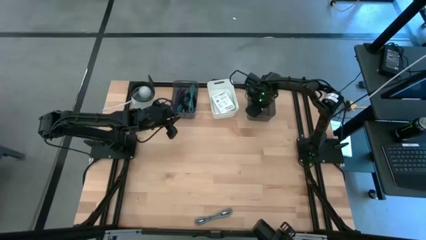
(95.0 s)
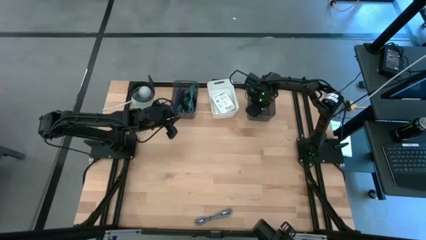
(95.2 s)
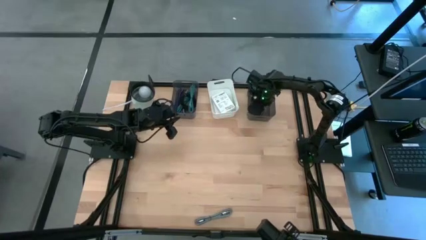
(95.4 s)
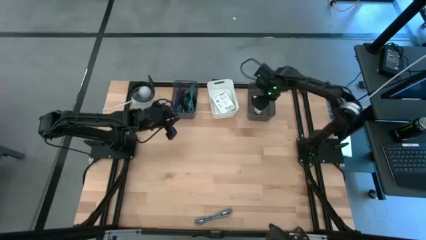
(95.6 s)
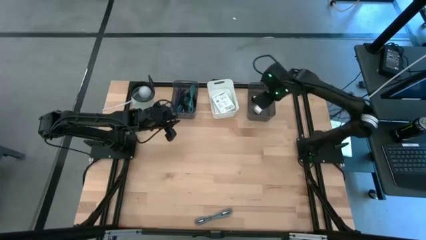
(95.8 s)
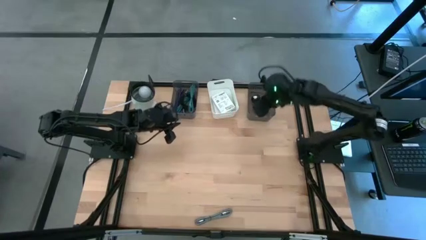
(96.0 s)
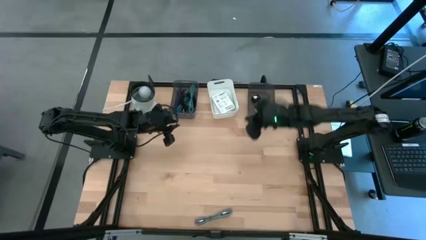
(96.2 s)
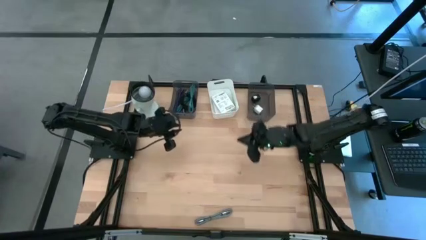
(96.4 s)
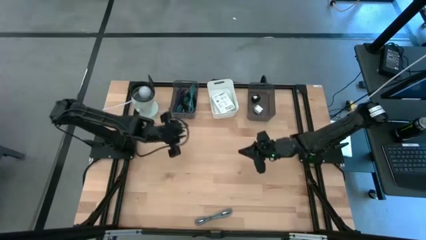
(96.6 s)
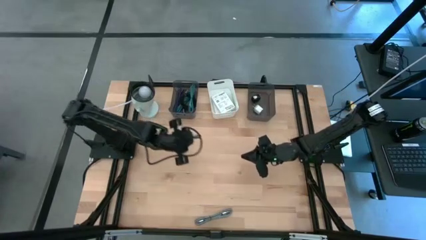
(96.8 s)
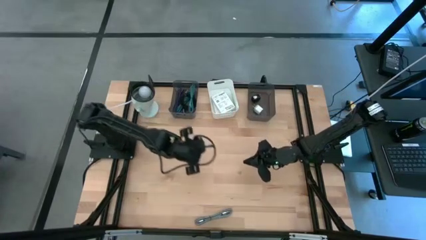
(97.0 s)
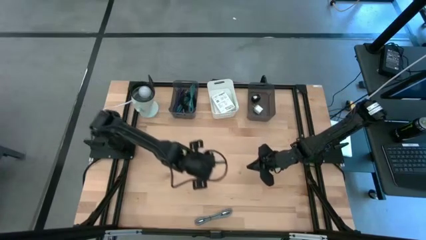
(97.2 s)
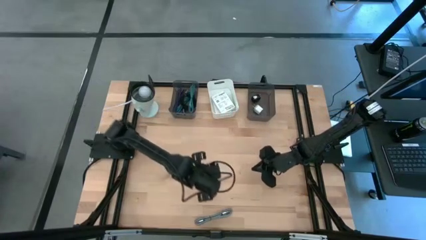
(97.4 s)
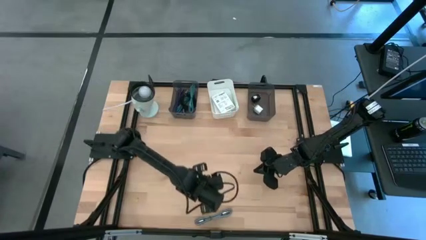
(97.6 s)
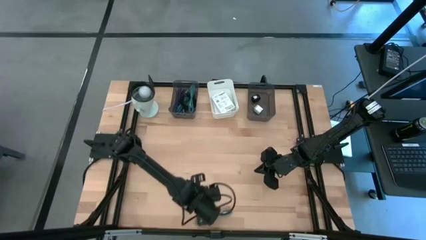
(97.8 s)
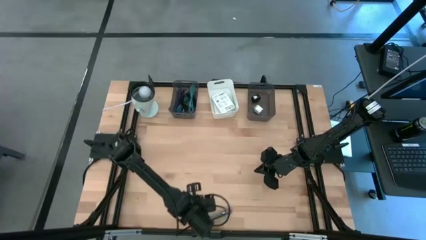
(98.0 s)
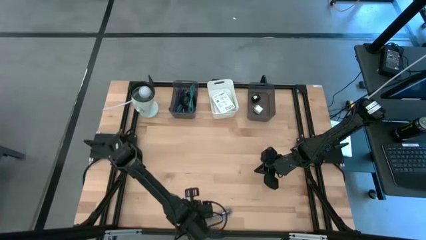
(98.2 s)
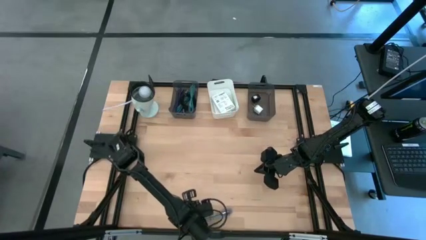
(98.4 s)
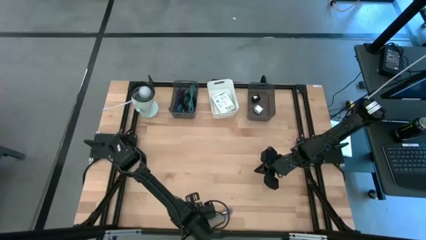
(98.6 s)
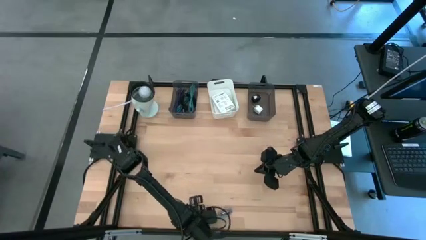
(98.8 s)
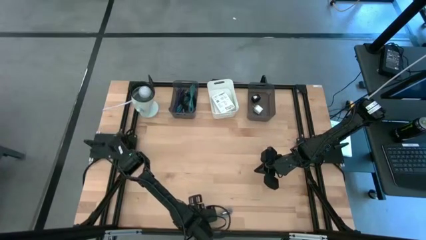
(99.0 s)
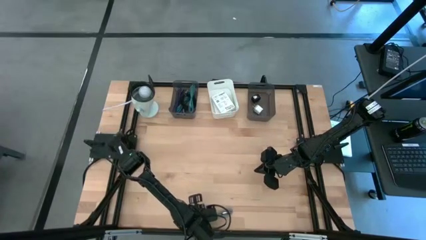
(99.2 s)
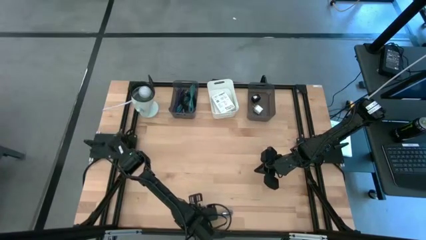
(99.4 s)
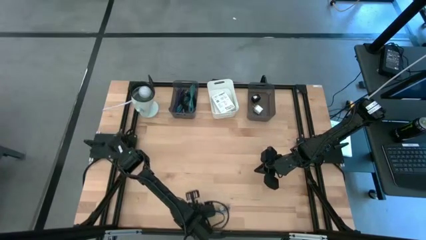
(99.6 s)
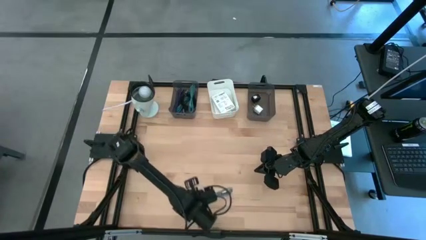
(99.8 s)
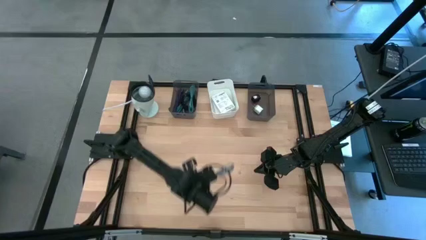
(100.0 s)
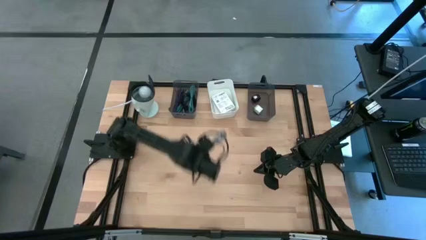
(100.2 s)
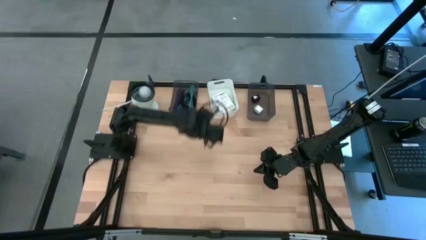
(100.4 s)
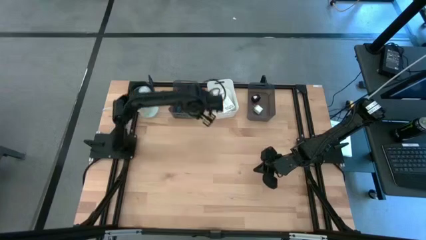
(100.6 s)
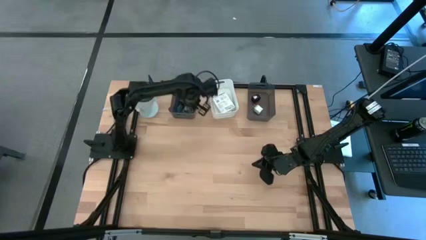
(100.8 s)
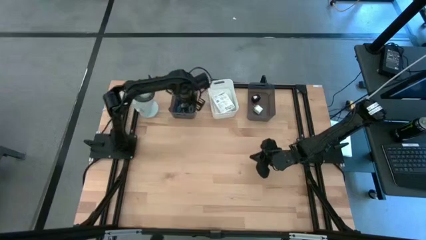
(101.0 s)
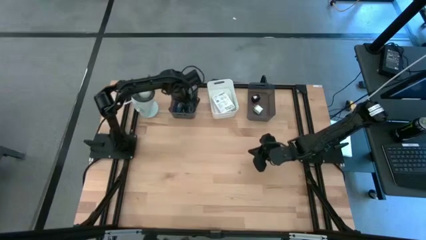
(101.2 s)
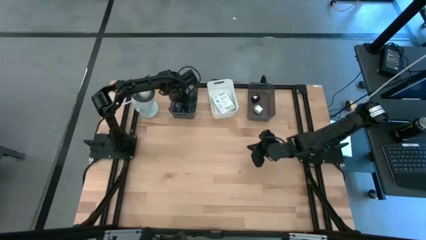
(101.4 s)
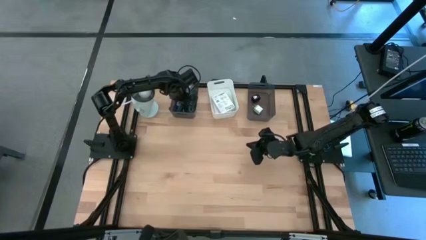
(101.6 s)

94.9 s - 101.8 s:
Task: Pick and place items into bin
Put the gray charger cable into the left black bin

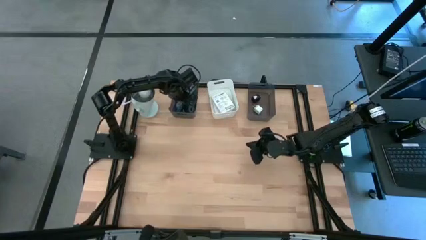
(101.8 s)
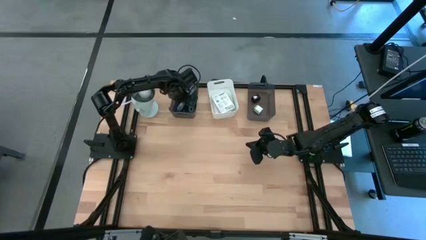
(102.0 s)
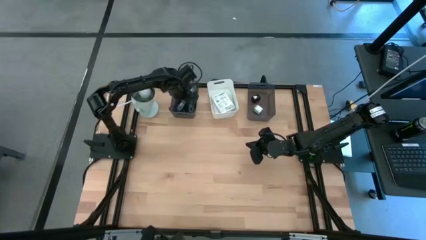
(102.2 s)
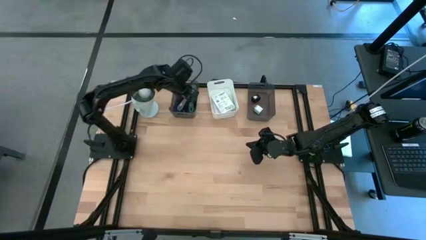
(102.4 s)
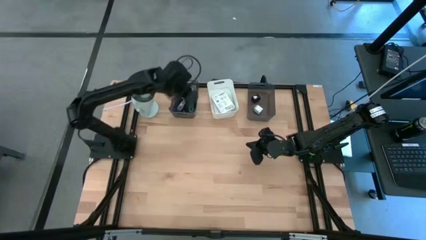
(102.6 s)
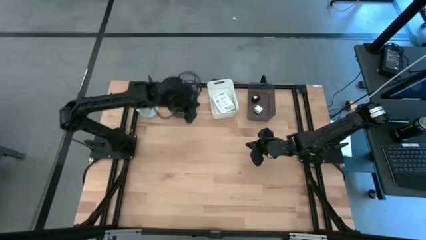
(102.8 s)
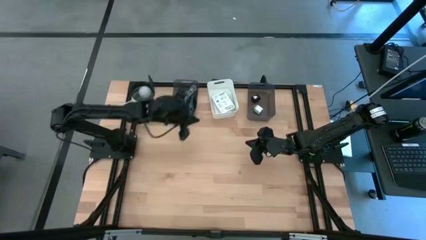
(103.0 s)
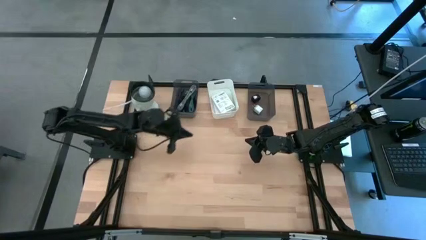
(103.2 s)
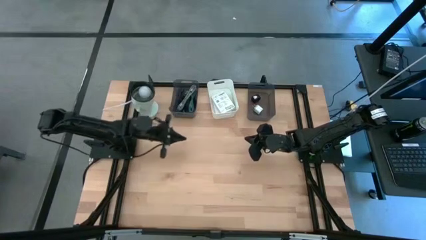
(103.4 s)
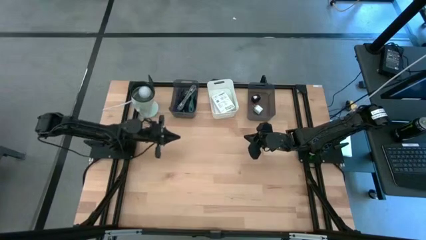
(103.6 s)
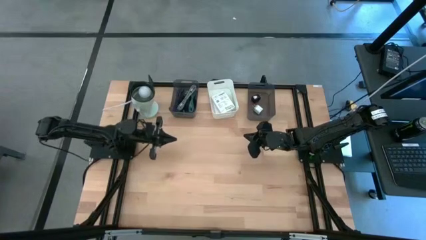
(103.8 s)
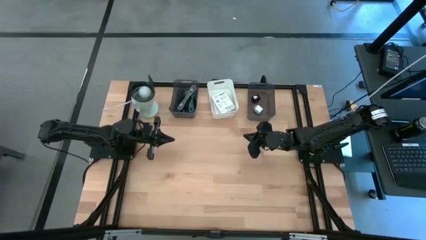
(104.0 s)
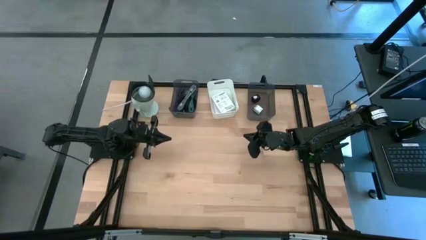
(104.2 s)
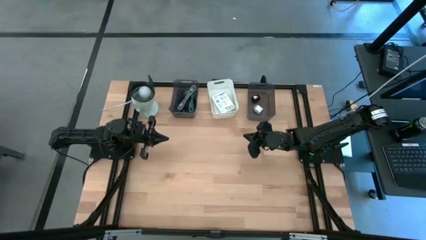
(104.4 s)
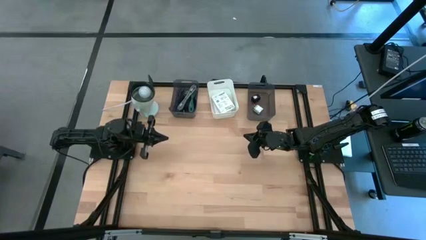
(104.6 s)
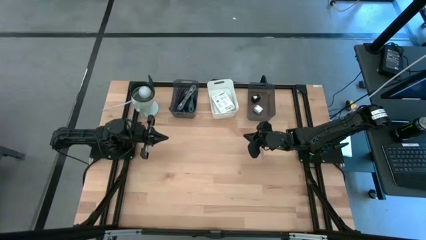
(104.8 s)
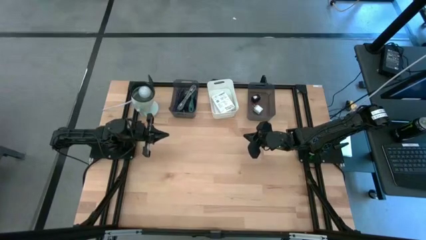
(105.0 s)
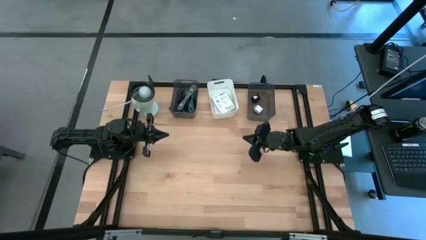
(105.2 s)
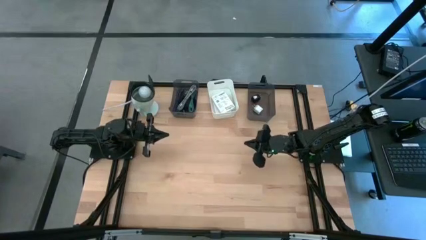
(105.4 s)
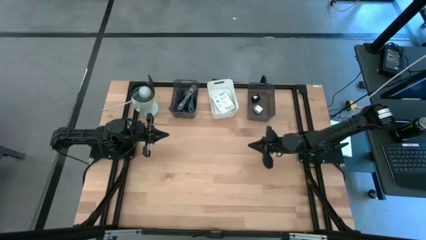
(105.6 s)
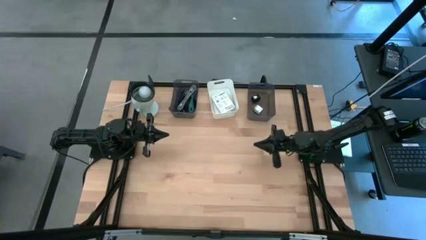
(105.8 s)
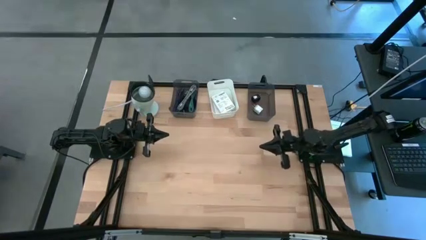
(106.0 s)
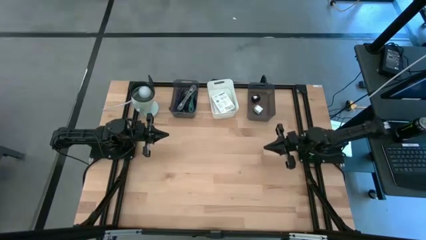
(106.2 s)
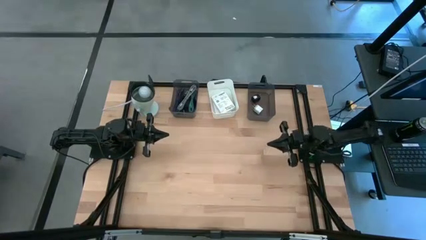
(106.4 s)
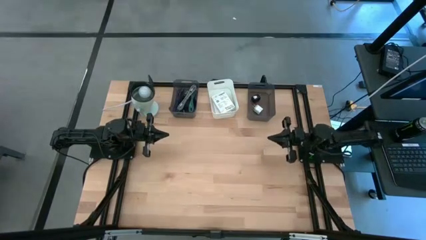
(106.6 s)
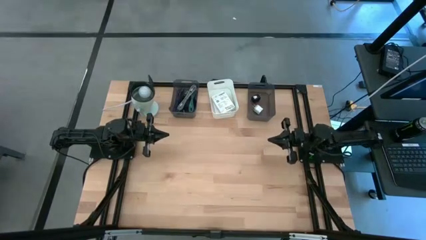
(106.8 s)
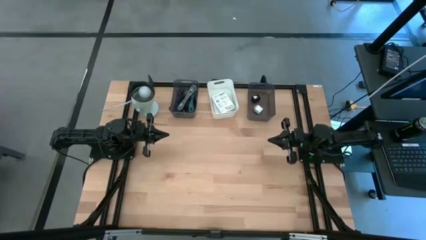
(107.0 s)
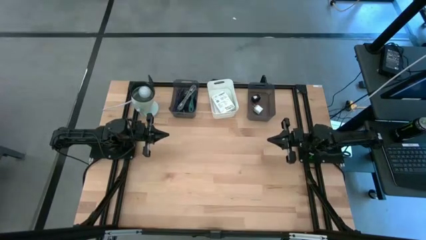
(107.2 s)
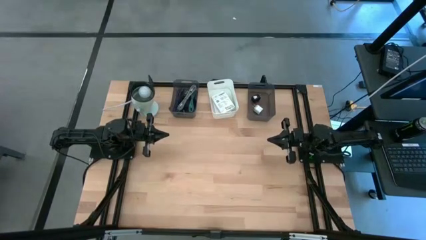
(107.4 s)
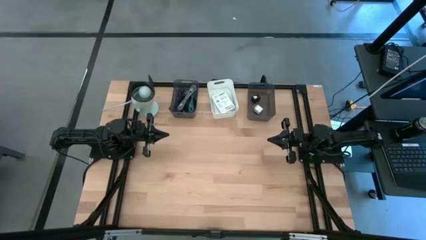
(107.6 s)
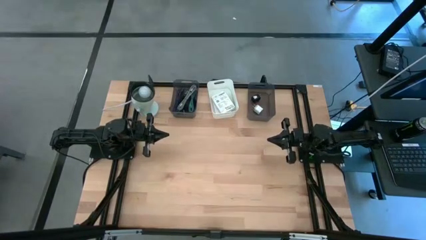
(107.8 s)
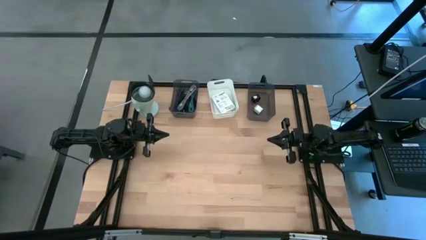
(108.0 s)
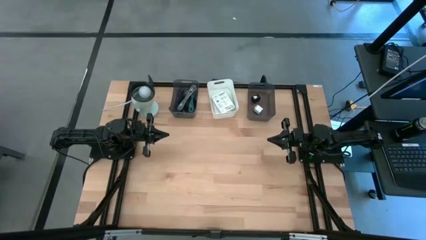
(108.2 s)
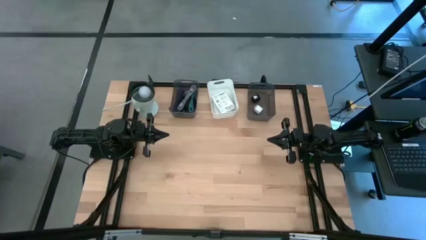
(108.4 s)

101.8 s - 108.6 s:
Return to Home Position
